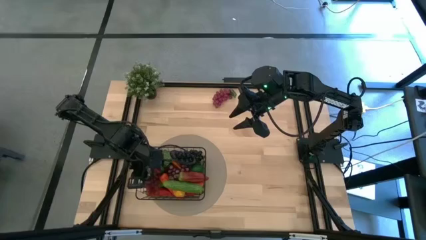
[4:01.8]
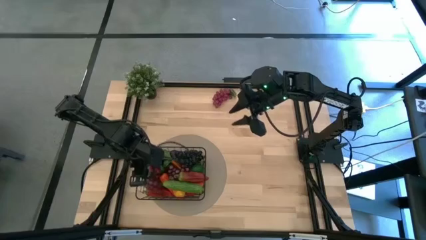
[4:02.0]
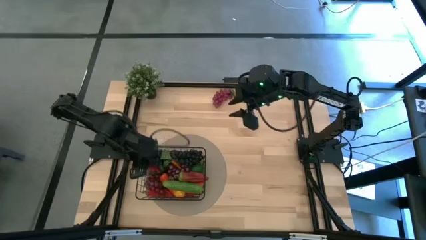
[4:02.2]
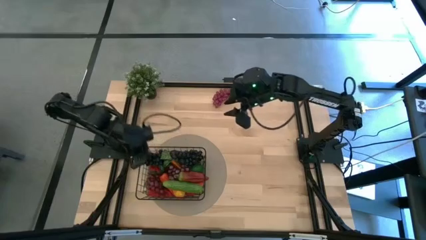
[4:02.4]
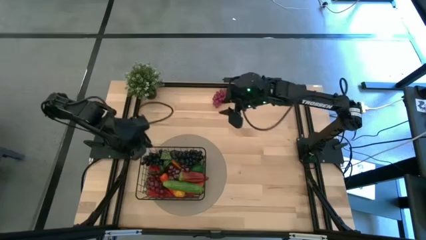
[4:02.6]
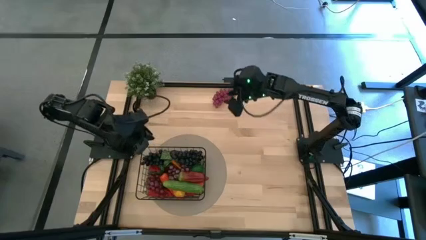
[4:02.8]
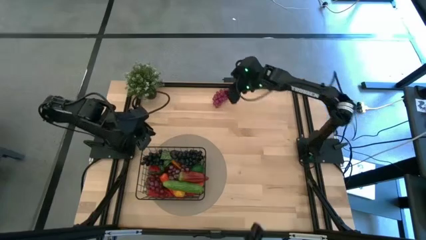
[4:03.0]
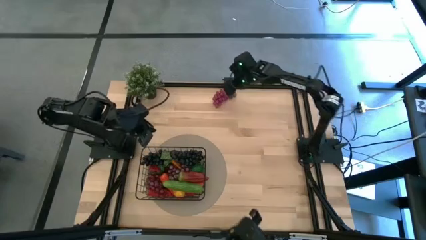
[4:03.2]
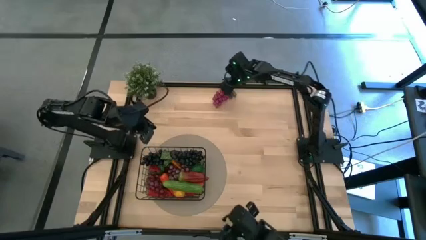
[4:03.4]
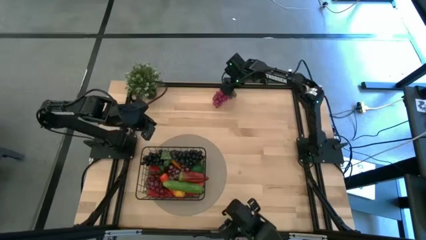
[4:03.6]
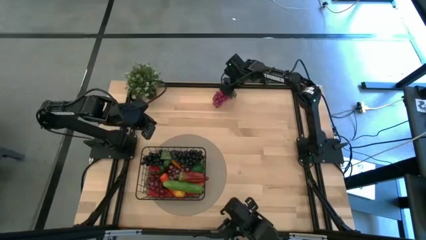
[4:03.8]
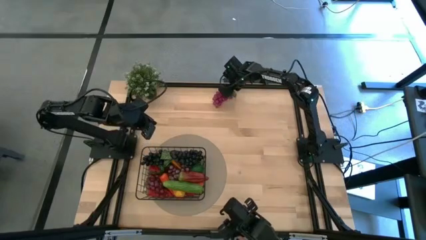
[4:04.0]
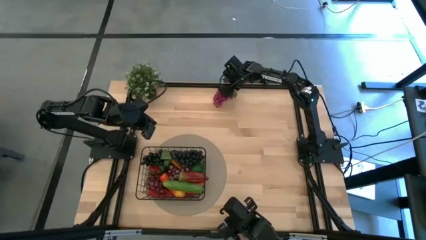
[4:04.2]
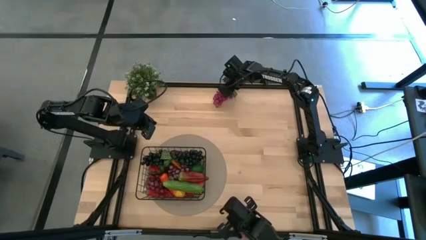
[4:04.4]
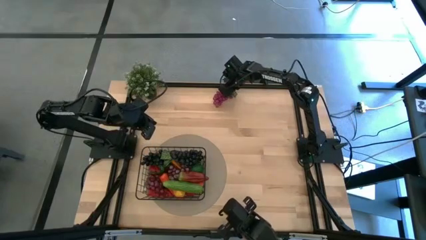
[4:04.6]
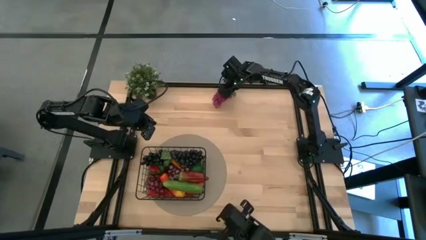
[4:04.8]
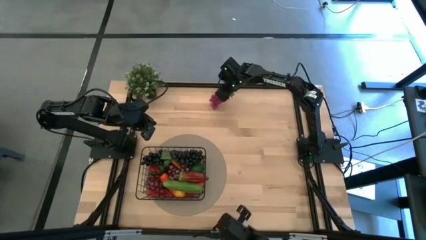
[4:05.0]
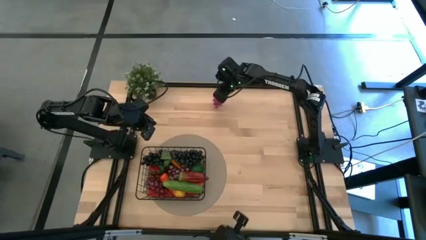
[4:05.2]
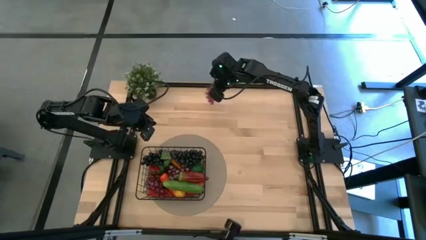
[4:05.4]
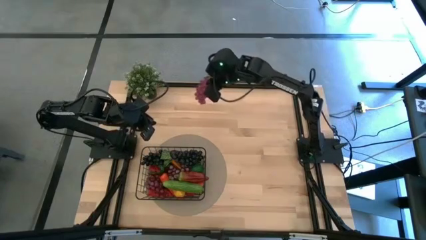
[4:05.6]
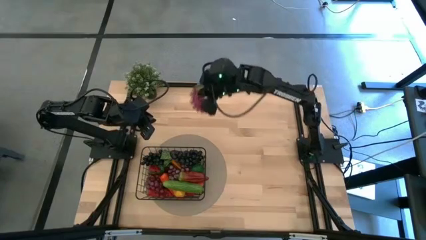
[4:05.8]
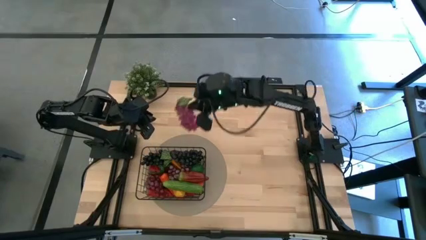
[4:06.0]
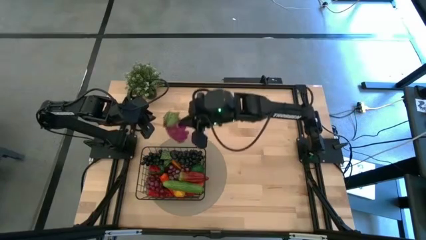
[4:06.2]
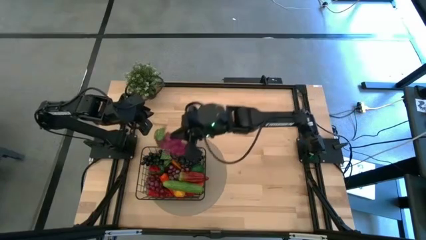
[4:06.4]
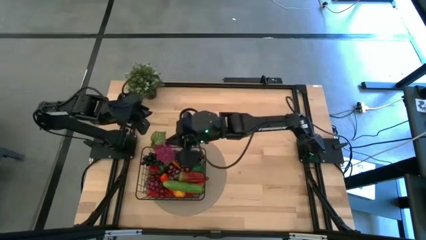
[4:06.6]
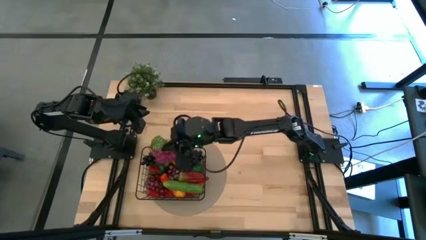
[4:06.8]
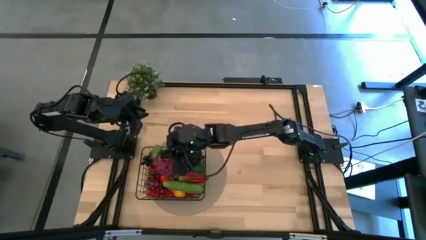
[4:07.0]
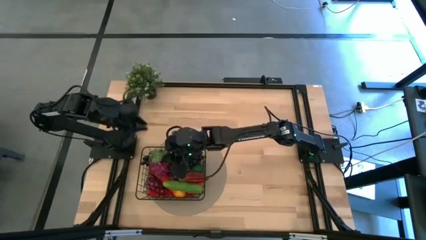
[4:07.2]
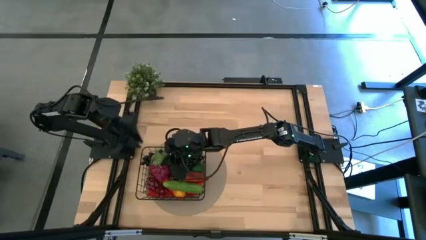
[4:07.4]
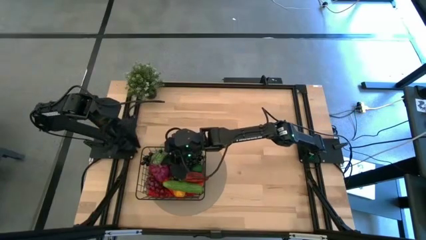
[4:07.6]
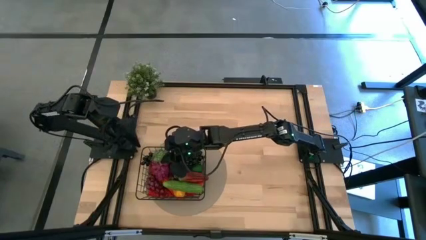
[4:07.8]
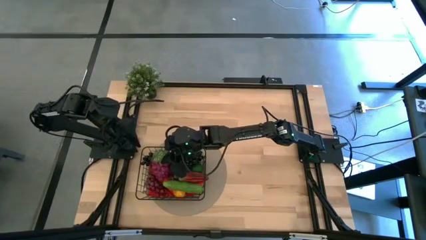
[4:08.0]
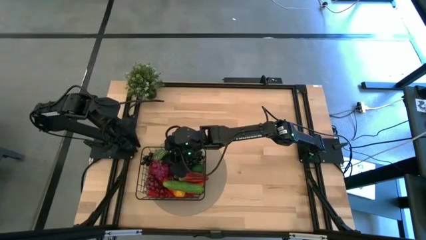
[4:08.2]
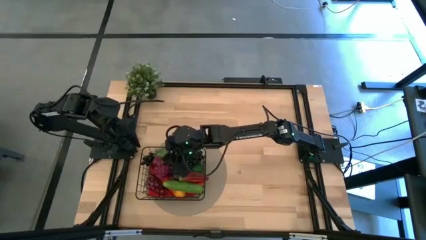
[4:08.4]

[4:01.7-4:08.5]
Task: Build produce basket
Put the purple grapes into the black wire basket

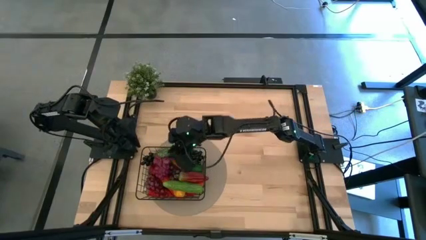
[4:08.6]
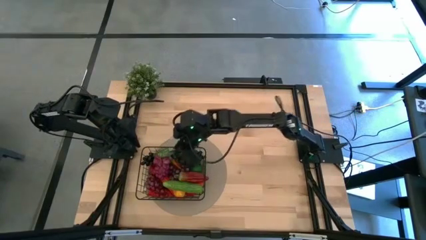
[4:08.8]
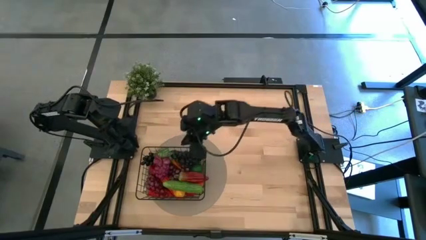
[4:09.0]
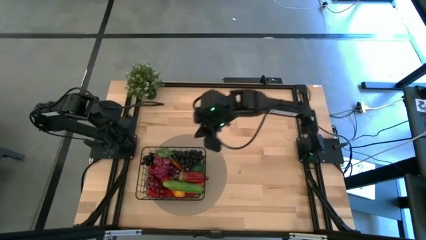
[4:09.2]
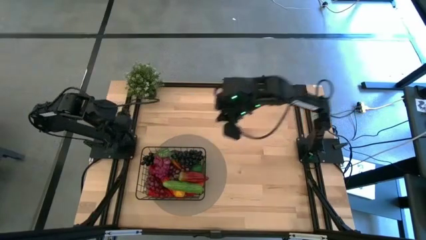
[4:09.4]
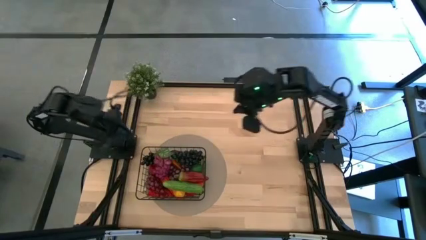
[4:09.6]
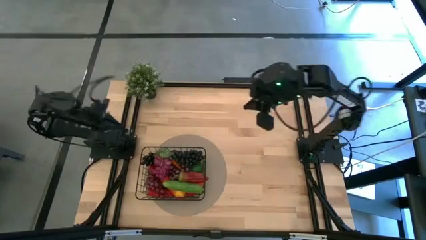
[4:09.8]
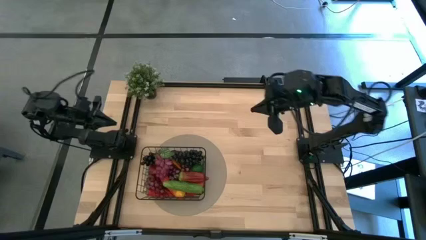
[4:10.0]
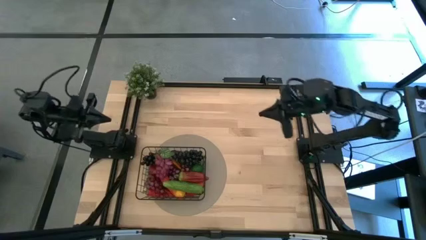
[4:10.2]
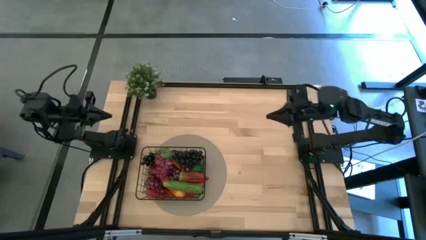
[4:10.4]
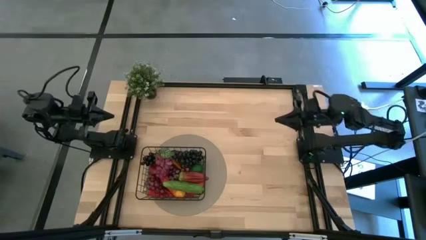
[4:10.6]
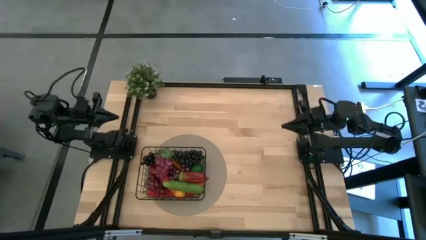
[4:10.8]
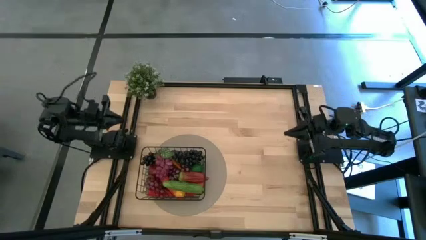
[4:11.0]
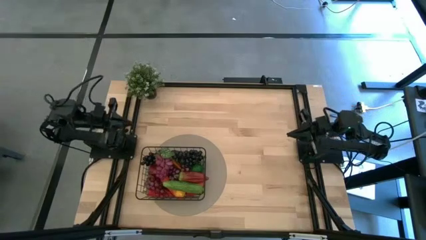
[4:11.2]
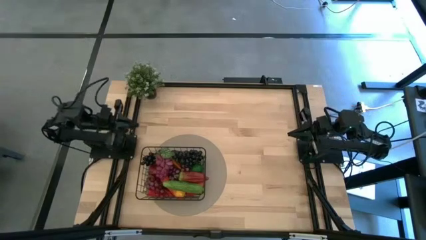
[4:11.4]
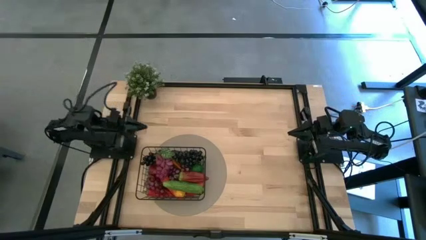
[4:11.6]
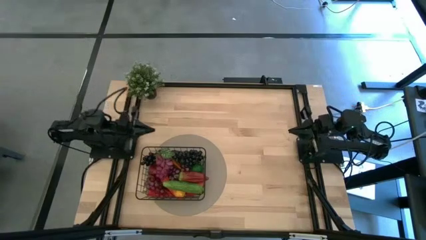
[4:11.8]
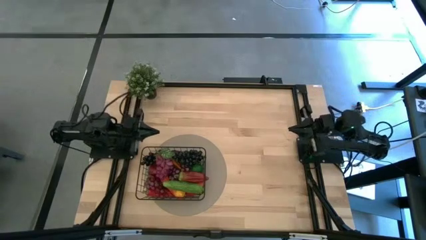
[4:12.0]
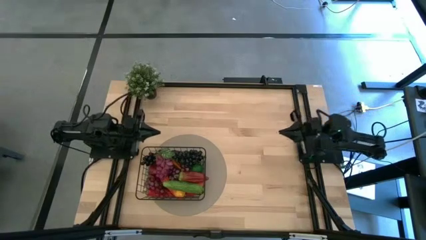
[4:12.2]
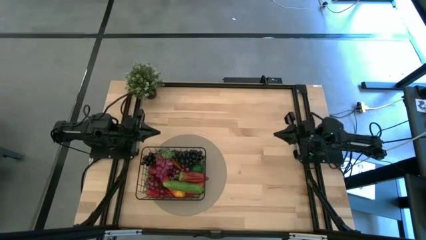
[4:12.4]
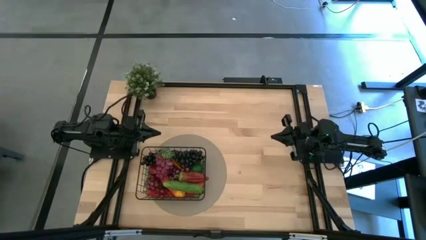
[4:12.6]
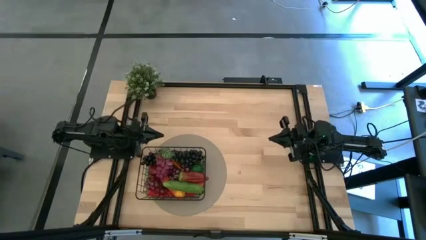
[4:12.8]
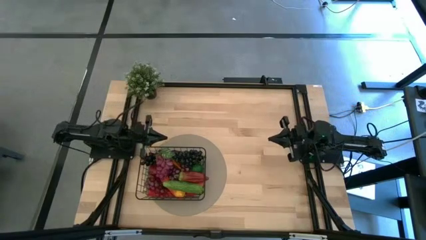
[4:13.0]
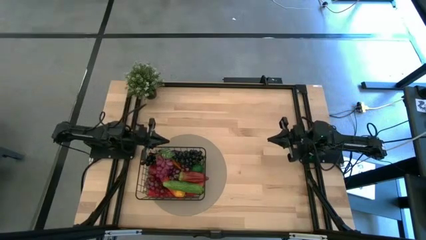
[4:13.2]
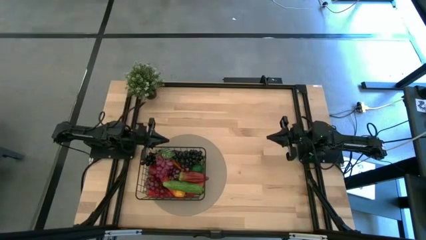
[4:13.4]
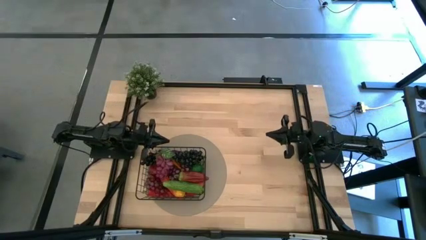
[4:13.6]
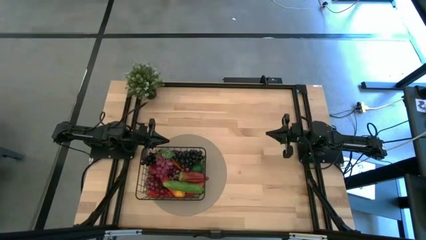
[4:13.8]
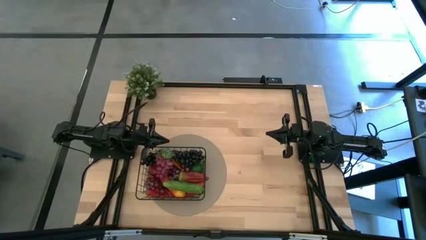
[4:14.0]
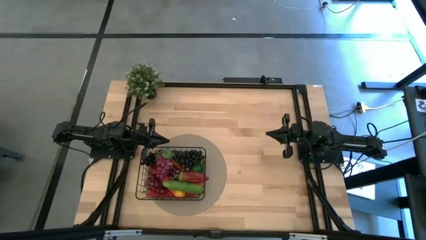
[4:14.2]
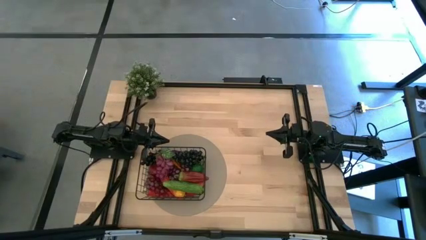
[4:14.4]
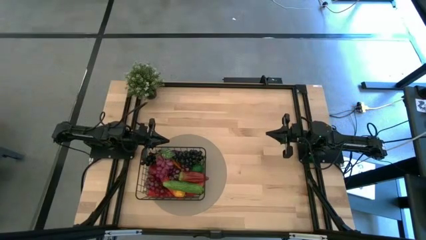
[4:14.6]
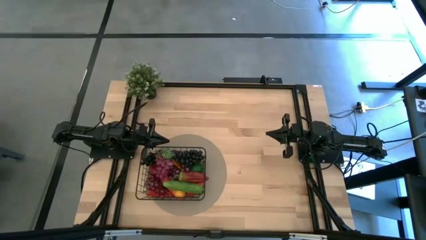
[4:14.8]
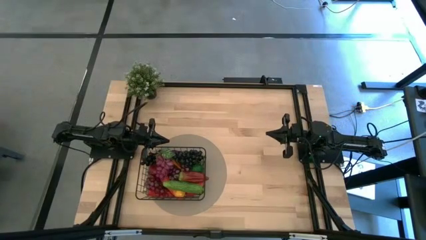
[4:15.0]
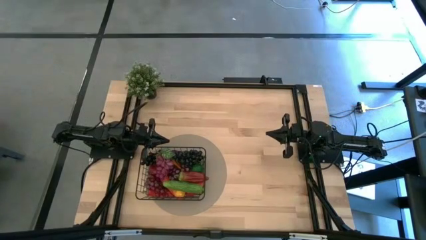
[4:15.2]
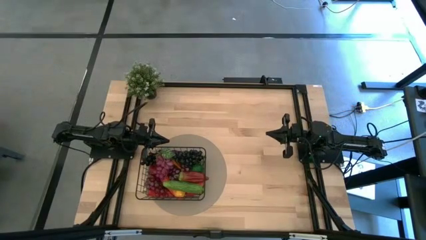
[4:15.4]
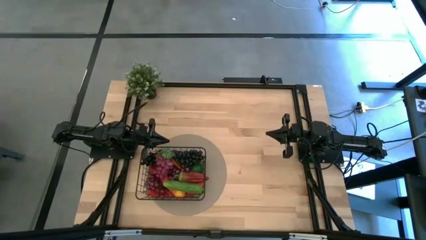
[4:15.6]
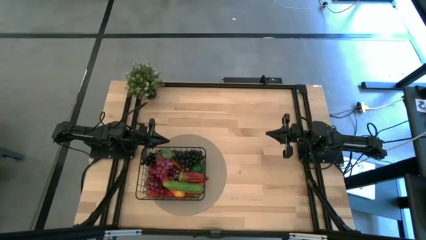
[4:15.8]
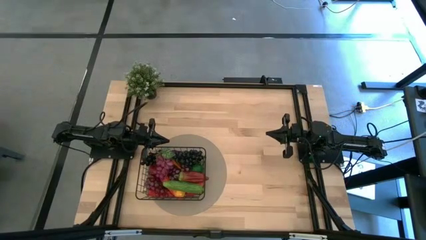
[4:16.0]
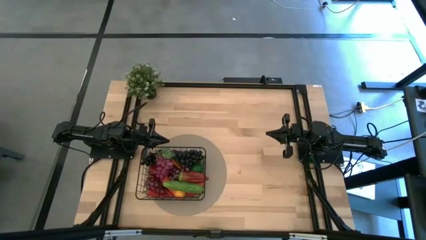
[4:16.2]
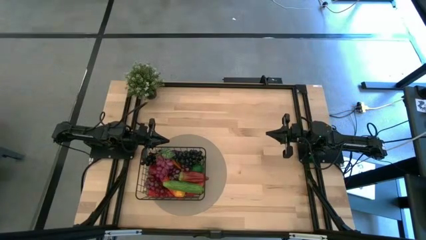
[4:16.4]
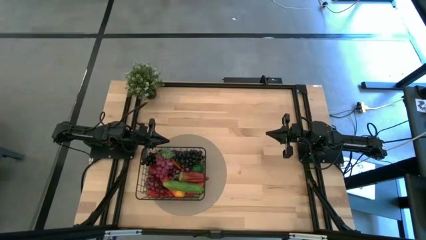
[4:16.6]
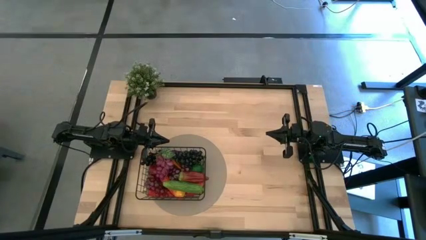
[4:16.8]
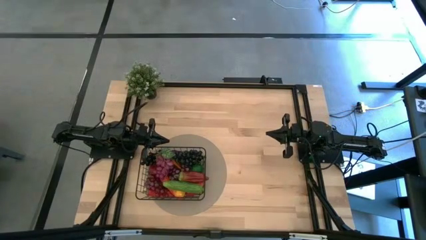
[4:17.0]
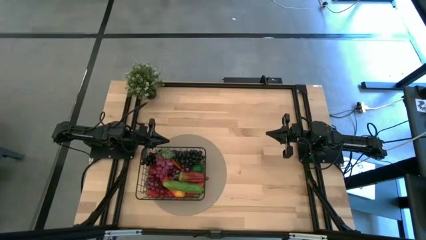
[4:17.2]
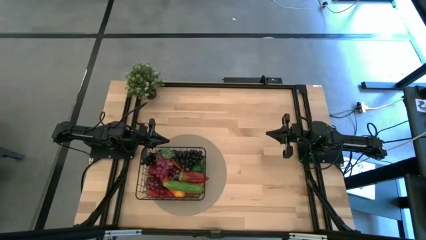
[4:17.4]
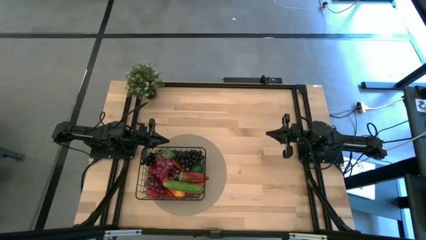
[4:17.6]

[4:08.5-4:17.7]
Return to Home Position
